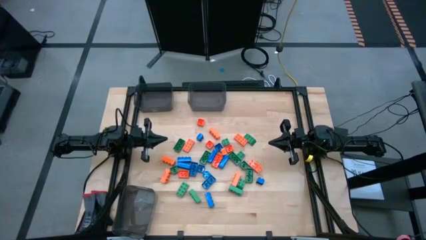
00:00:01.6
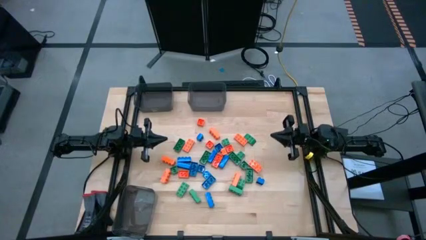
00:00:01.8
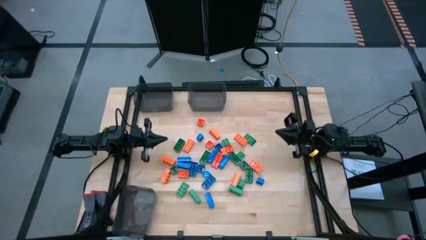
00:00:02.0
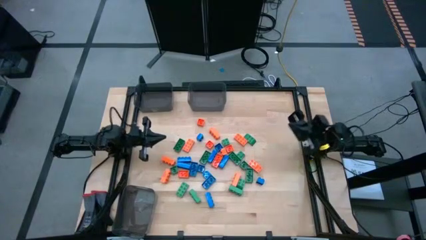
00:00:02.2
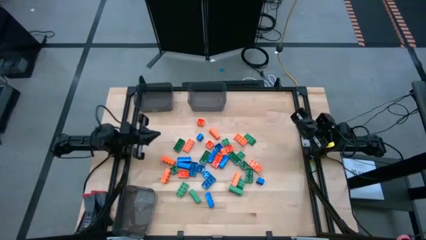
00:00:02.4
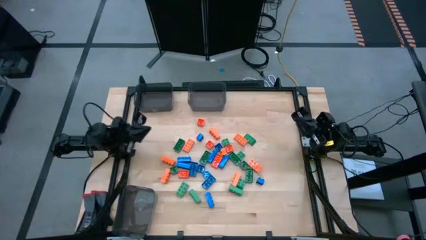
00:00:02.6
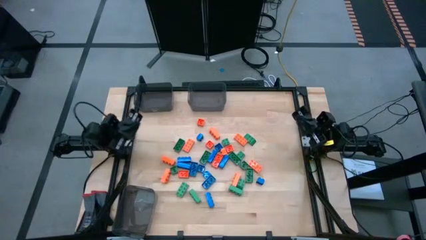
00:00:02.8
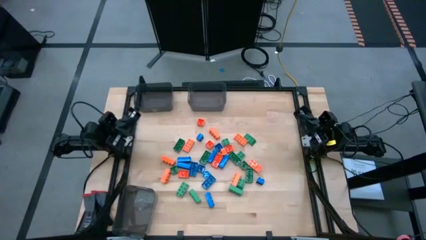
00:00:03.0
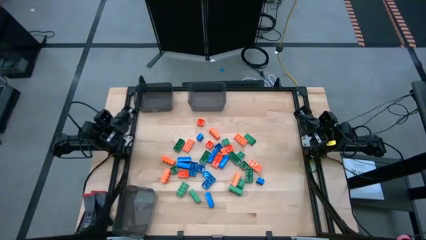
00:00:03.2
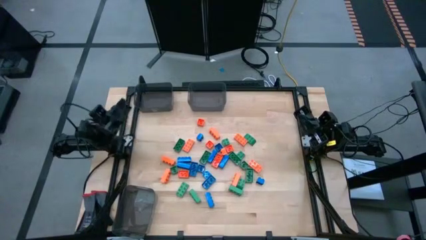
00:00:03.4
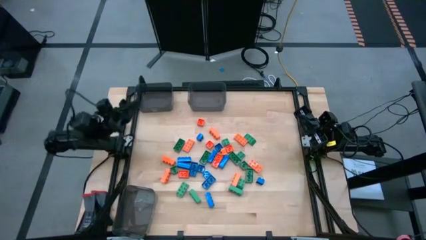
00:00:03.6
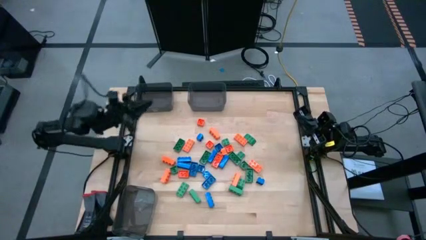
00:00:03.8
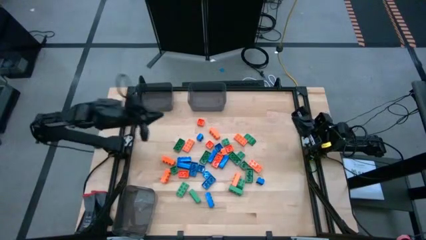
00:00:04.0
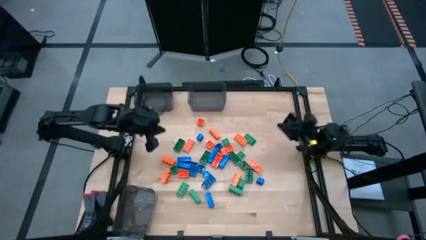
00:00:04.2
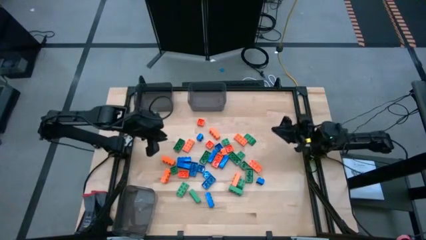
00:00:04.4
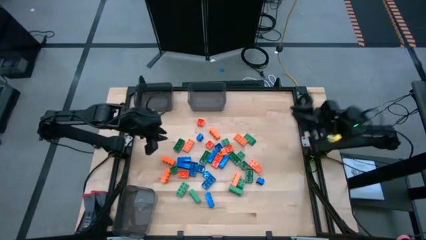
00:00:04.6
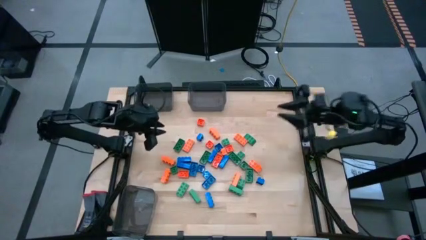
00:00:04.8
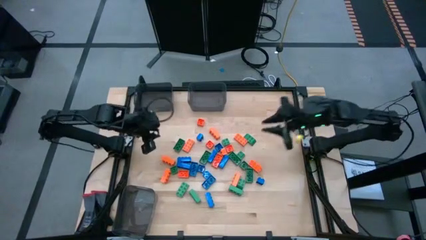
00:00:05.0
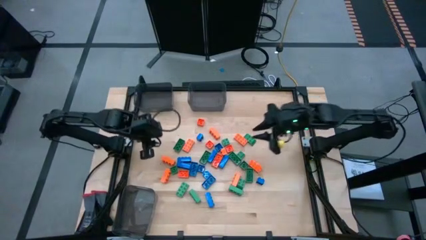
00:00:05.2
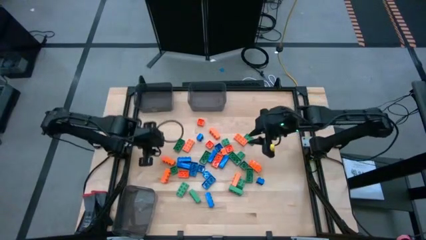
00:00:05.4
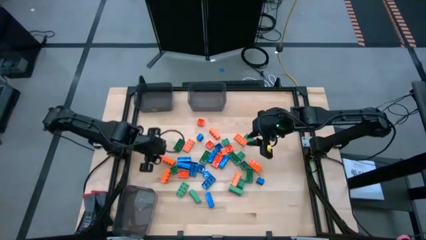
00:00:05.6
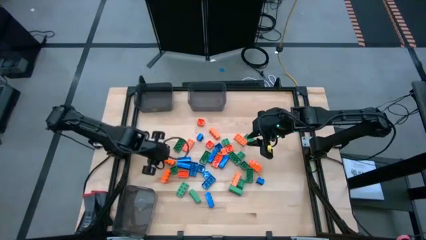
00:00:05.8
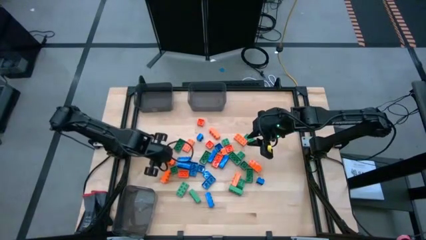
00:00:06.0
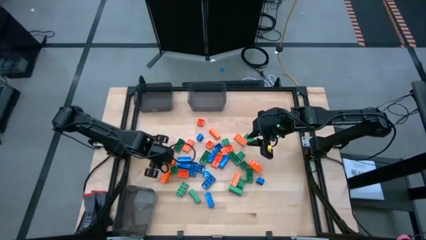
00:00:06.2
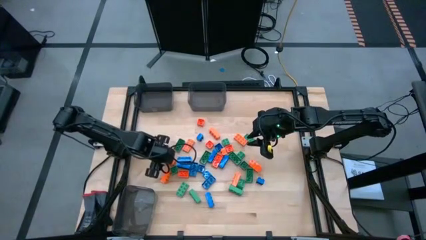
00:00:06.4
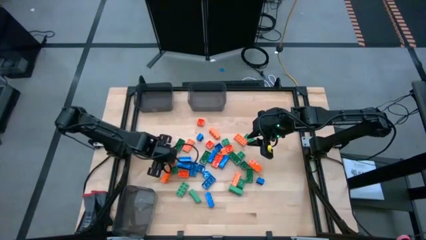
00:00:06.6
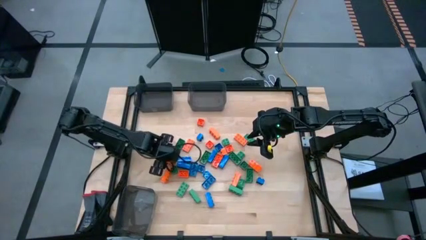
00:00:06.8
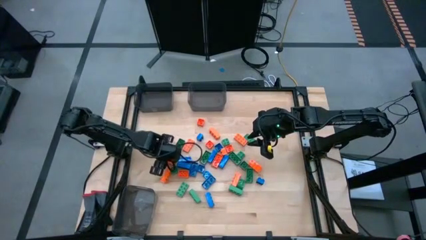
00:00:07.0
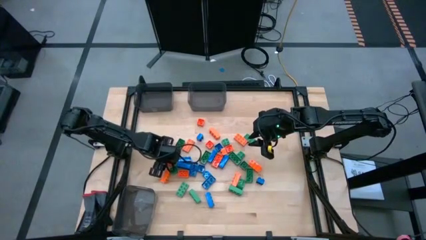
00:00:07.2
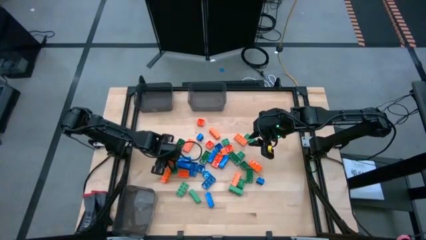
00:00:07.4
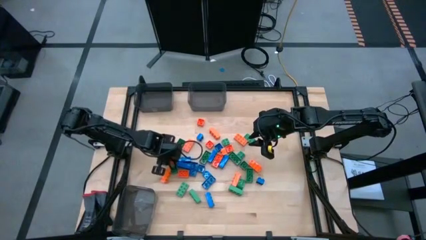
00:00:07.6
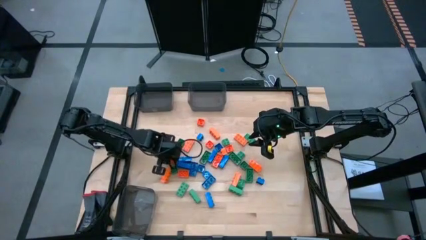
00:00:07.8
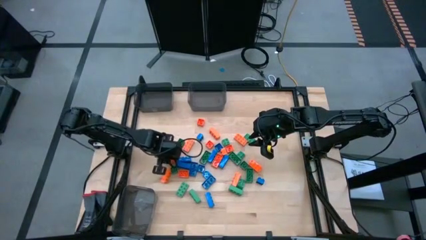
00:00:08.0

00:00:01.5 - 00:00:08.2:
Task: Sort blocks
Put the orange gamepiece into the bottom black bin

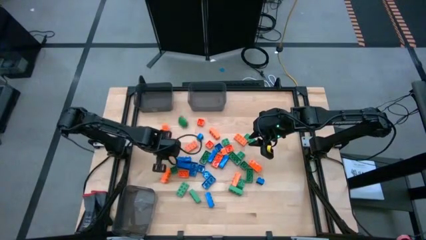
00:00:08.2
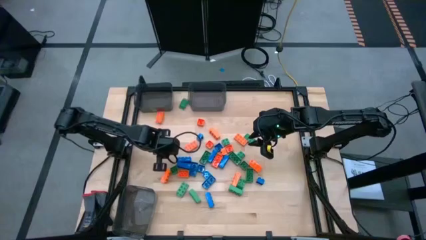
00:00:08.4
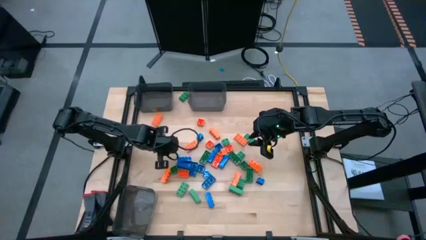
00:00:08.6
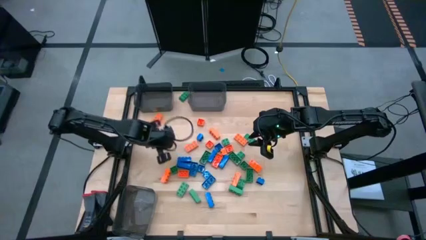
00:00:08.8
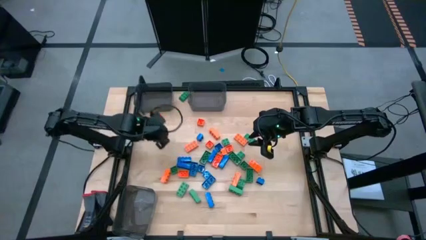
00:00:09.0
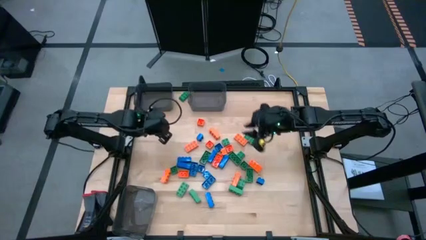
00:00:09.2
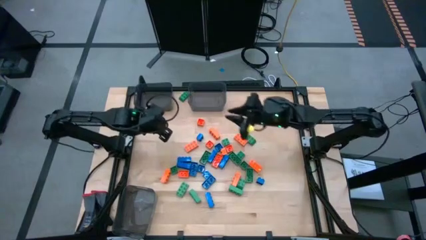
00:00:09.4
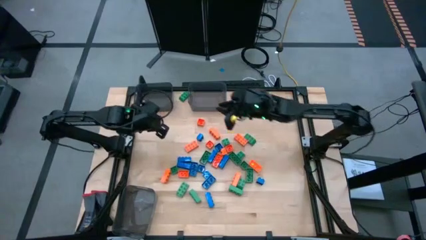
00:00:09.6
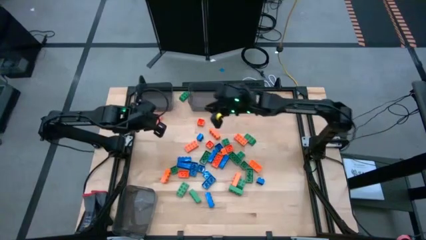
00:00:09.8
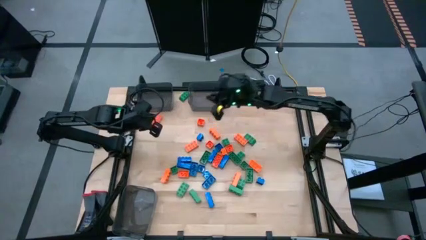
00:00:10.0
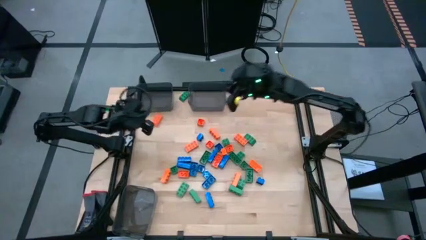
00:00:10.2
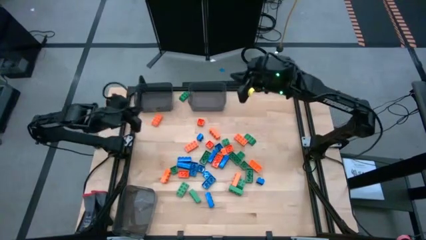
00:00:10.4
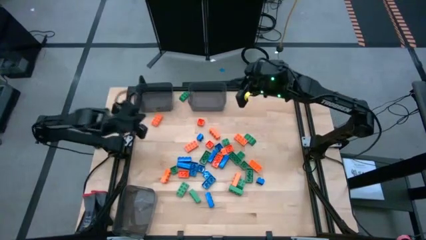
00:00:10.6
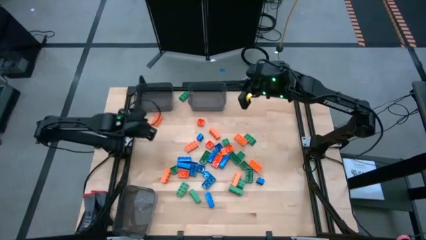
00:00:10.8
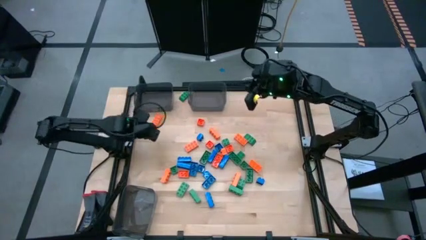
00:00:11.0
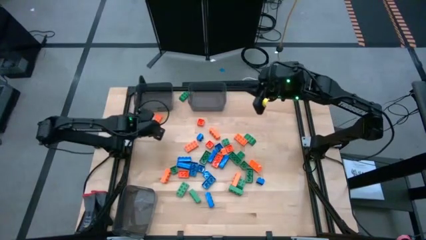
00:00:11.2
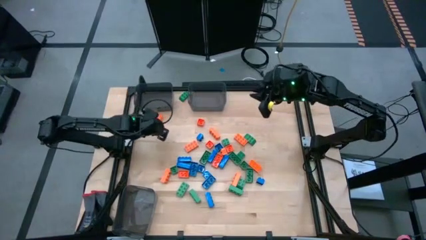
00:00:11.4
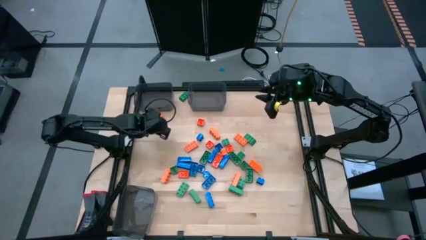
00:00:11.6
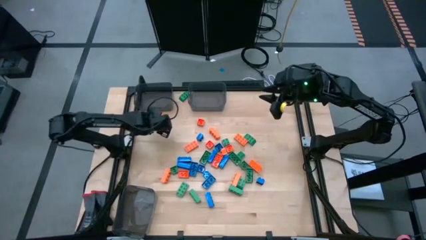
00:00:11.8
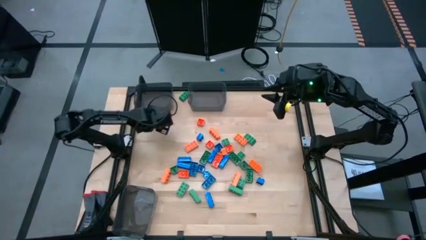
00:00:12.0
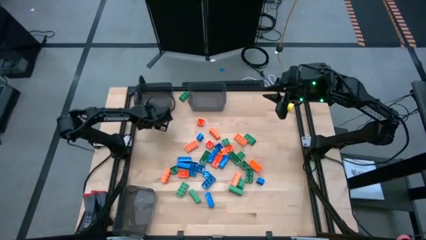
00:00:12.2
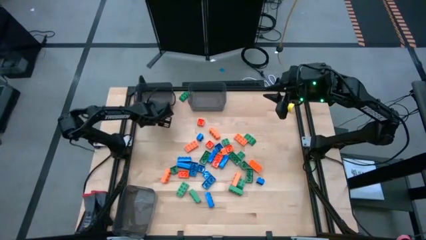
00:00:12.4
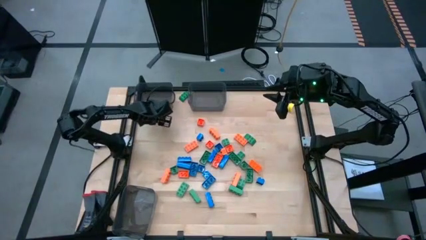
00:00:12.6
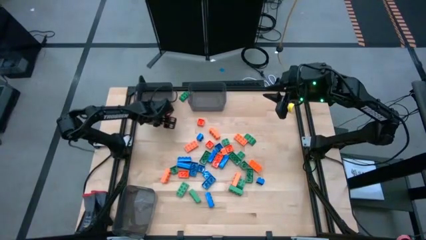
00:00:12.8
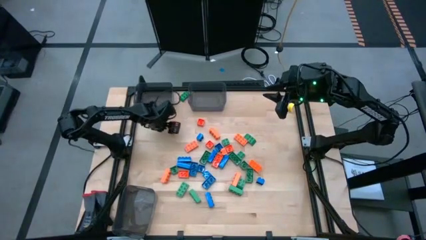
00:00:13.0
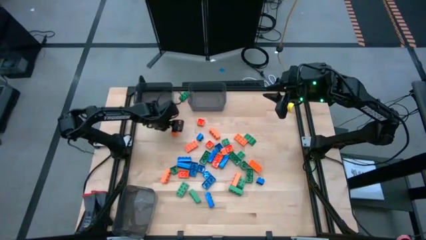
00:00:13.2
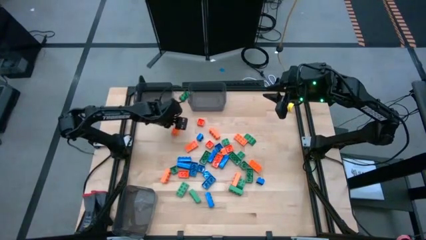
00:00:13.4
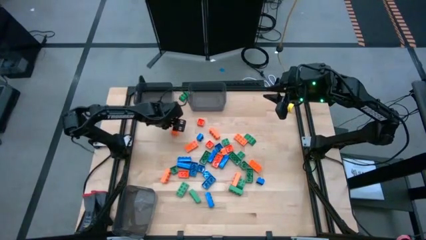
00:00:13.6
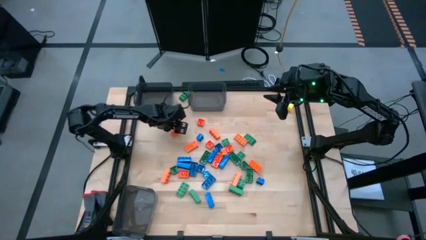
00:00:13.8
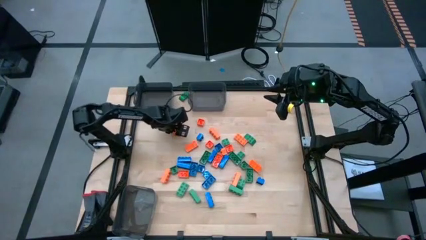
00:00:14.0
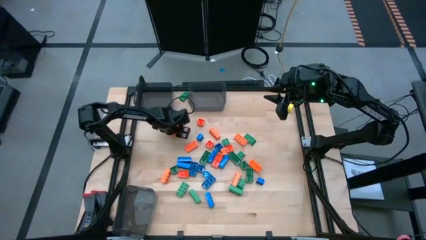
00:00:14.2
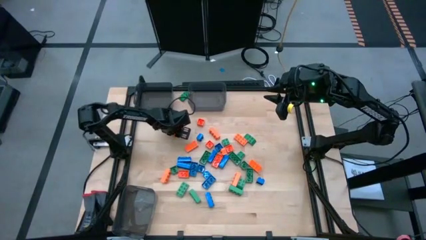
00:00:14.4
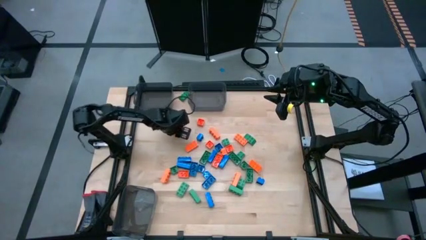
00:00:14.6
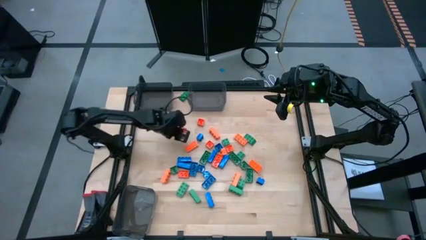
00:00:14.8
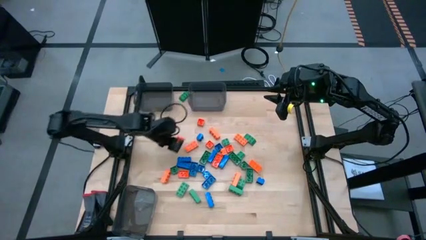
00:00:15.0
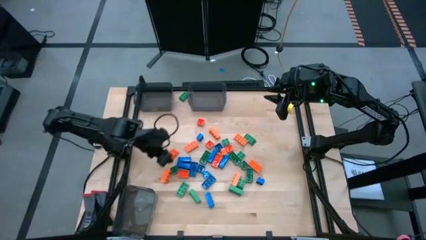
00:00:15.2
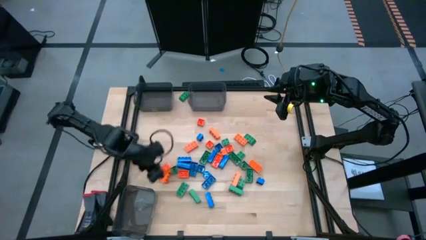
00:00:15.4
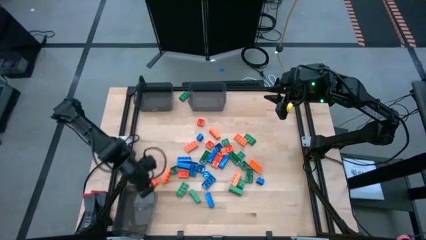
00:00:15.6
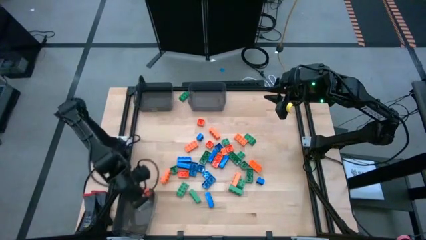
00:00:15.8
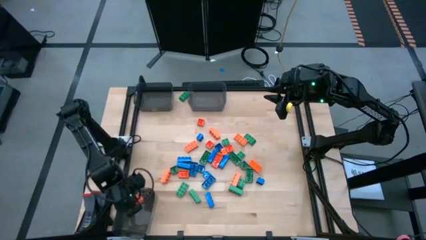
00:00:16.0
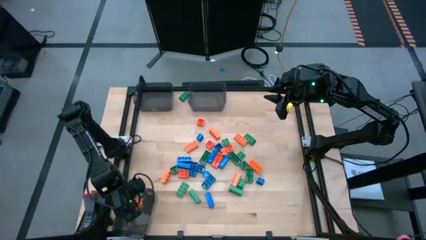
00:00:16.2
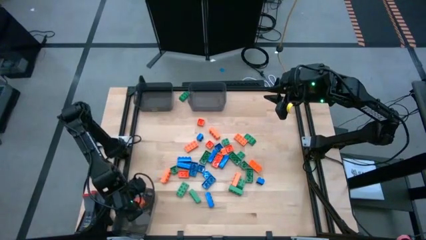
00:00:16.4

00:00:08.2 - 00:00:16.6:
Put the orange gamepiece into the bottom black bin
